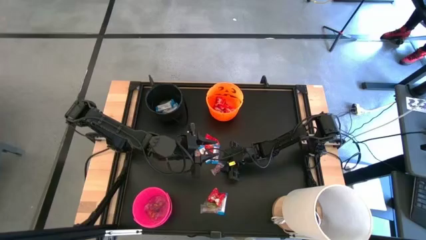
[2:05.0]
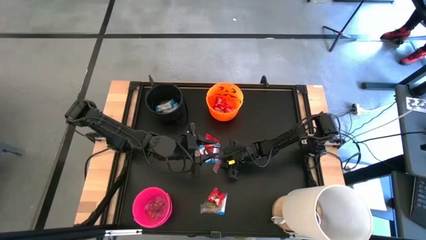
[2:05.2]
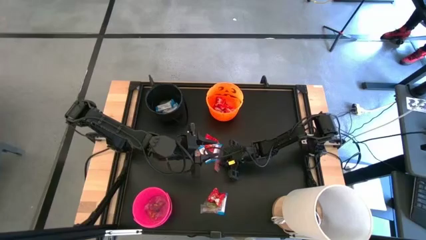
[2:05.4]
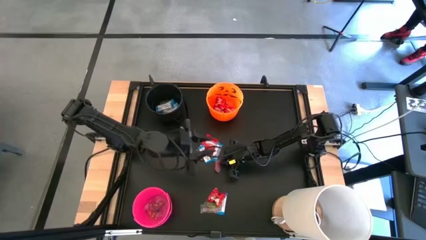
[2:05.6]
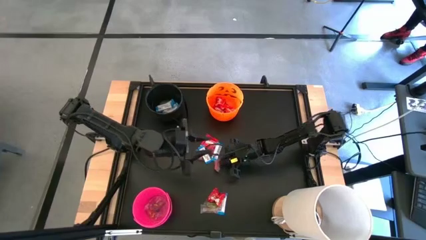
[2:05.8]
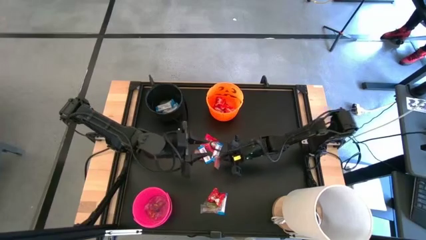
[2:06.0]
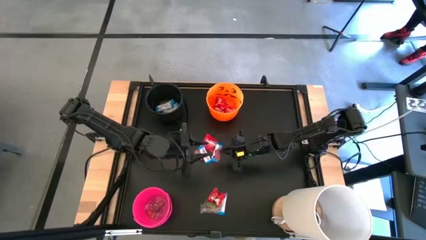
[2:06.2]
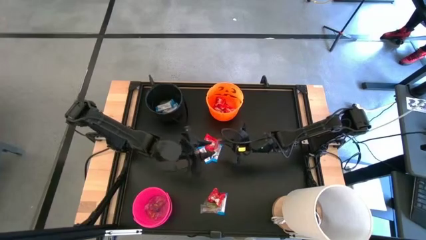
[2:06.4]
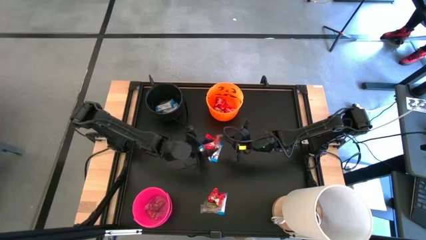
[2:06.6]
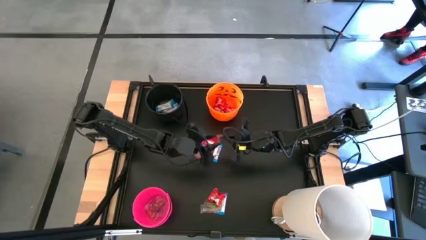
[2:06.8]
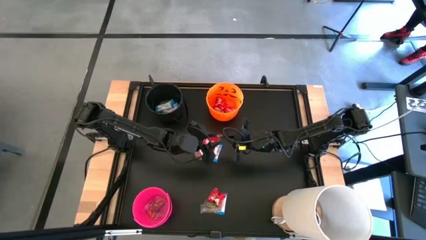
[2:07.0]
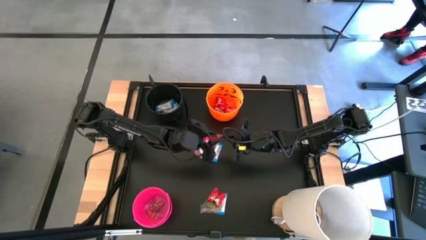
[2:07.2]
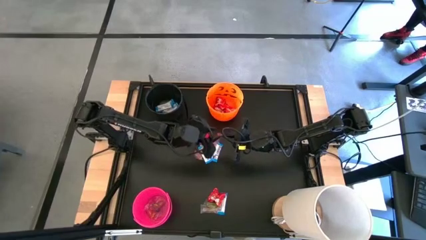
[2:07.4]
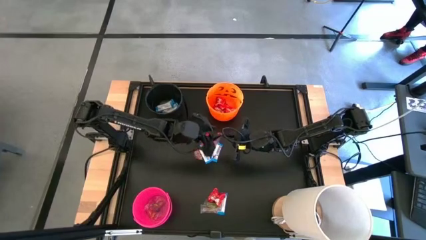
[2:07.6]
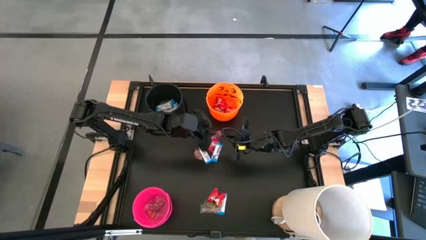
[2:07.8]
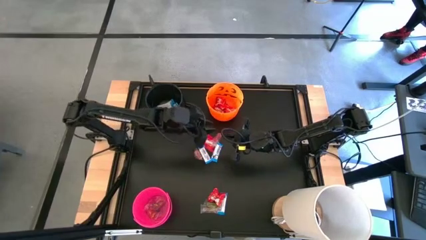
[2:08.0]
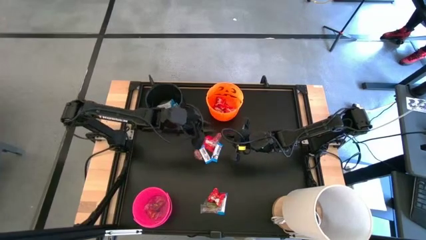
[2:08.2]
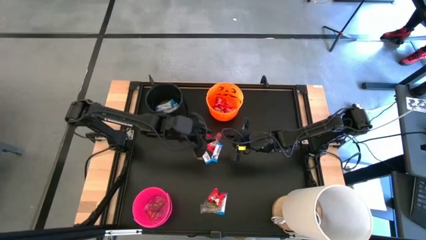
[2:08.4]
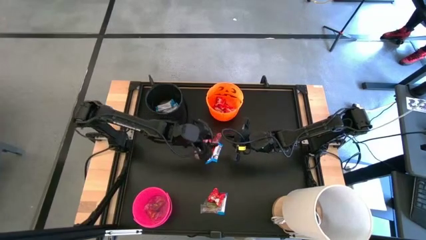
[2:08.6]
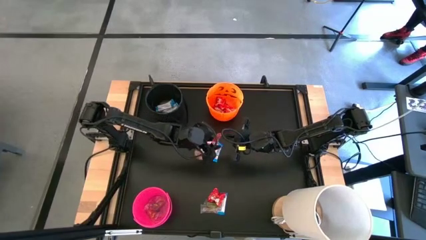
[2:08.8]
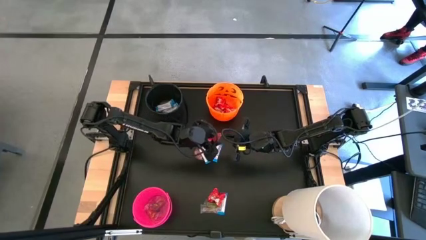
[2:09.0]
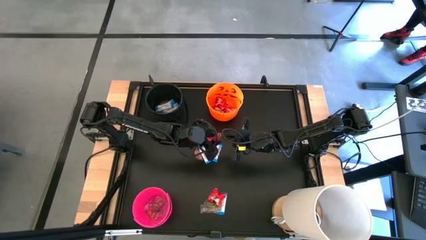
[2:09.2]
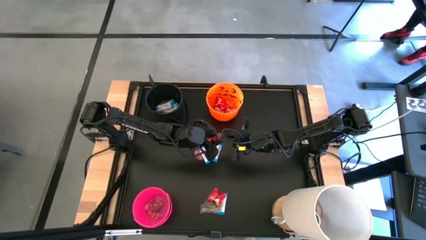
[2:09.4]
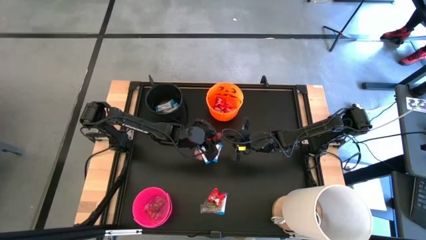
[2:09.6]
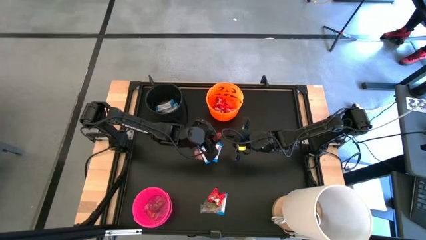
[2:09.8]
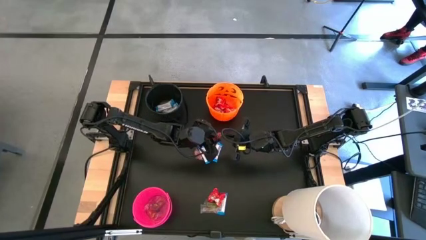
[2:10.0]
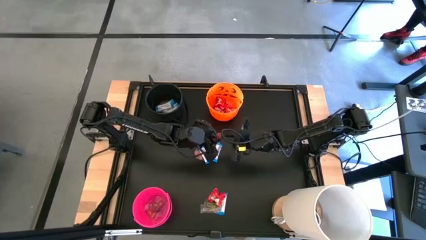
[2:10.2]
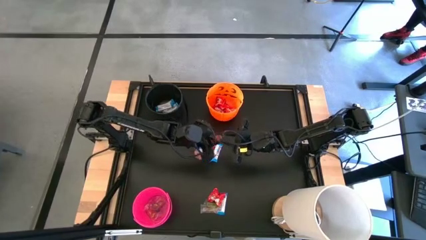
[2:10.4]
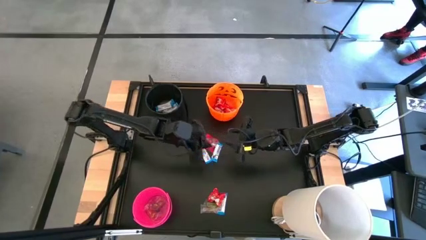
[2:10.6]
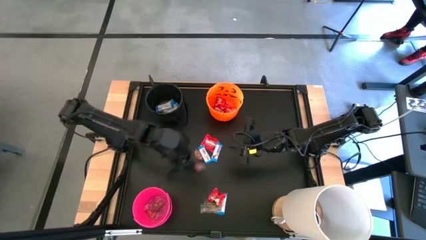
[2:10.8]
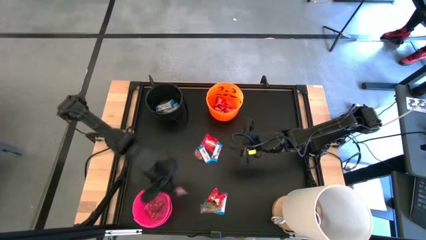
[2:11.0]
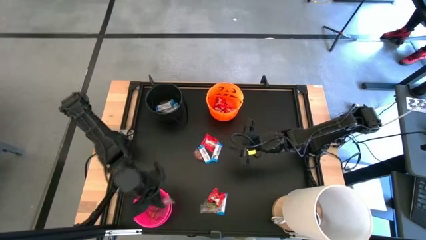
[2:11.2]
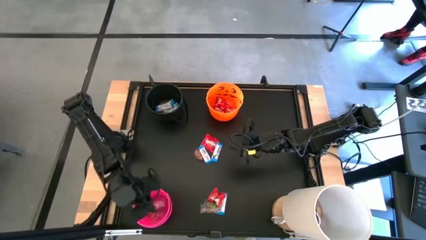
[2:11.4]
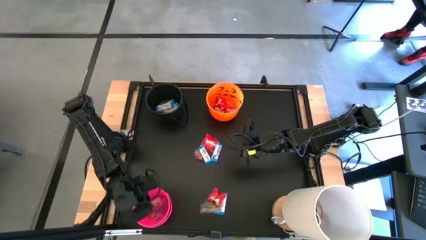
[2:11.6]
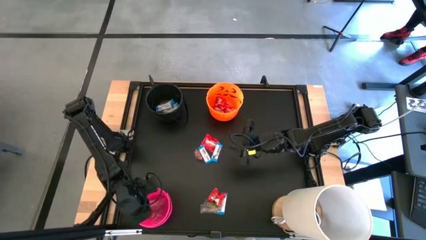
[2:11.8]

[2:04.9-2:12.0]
Task: Sort candy
Put the top white candy into the pink bin

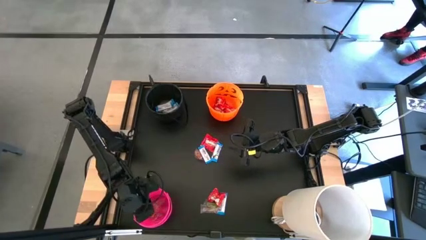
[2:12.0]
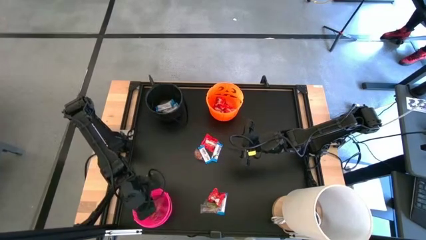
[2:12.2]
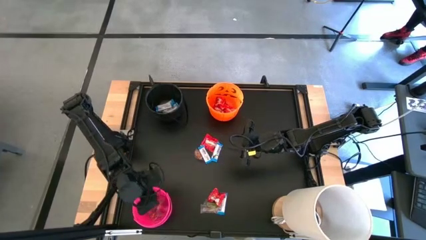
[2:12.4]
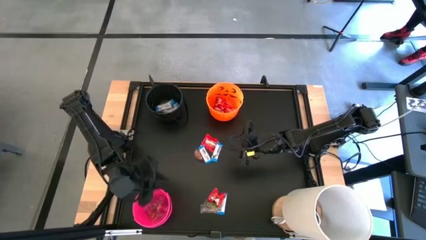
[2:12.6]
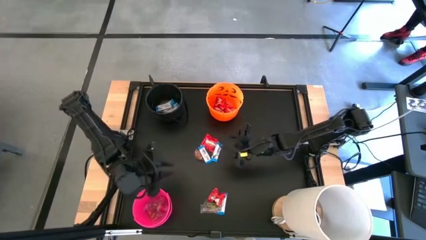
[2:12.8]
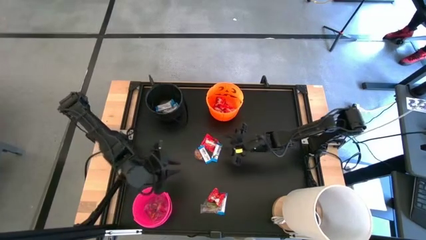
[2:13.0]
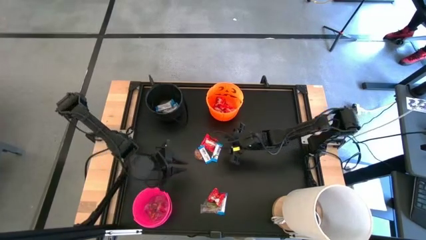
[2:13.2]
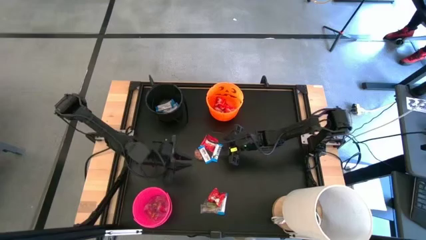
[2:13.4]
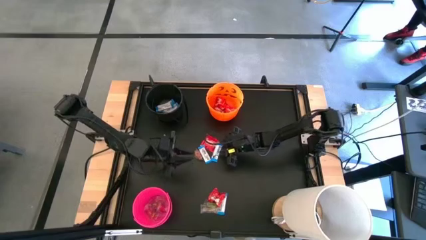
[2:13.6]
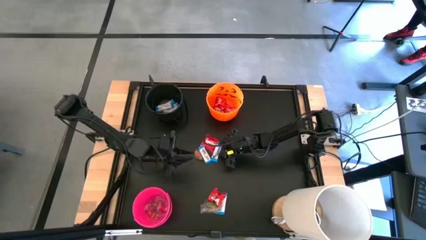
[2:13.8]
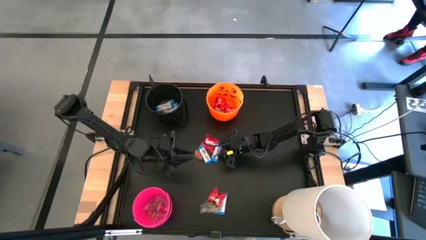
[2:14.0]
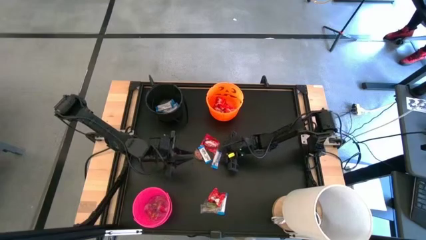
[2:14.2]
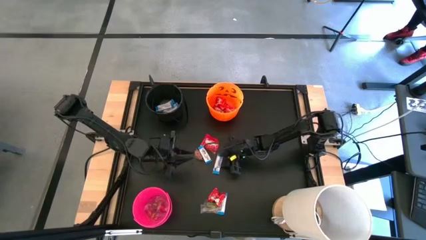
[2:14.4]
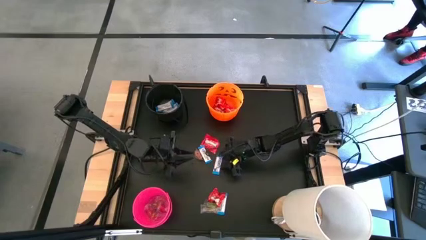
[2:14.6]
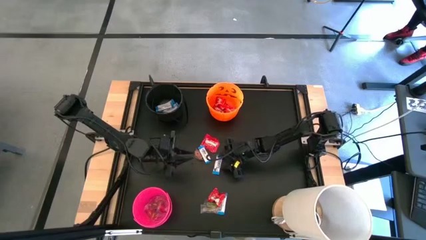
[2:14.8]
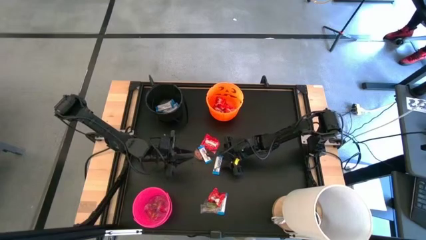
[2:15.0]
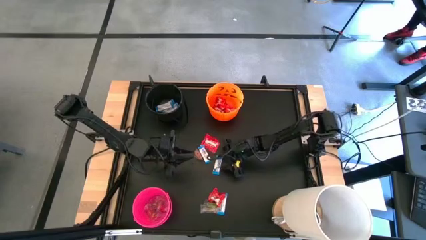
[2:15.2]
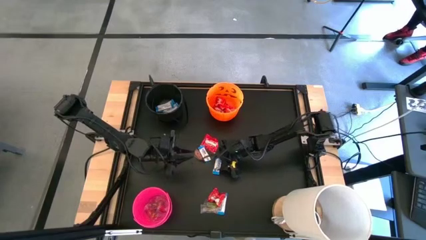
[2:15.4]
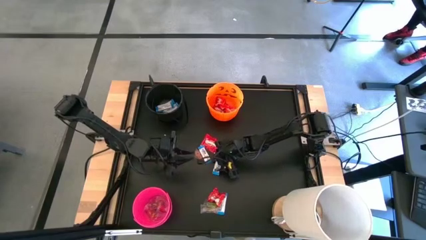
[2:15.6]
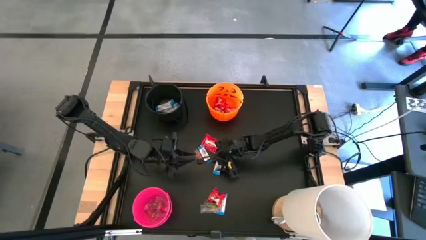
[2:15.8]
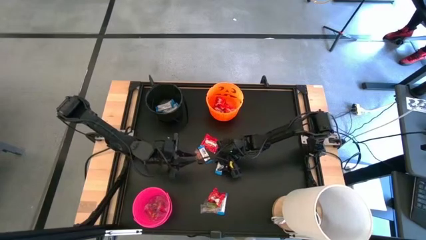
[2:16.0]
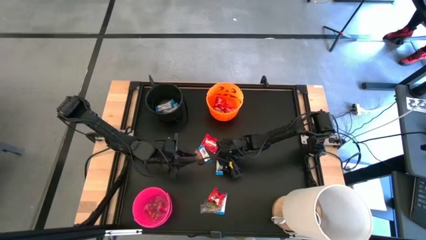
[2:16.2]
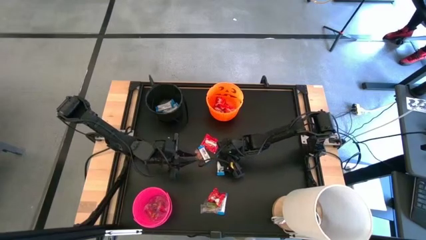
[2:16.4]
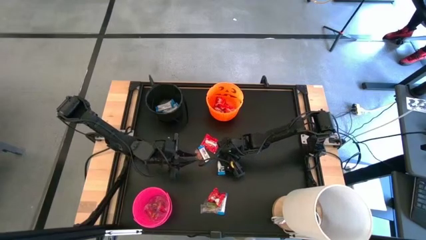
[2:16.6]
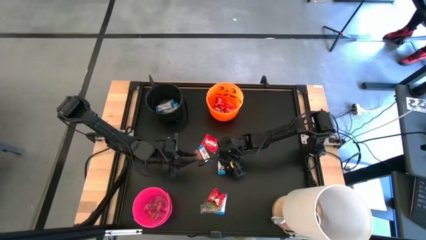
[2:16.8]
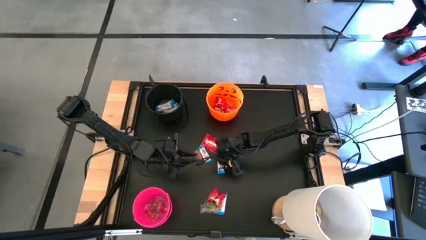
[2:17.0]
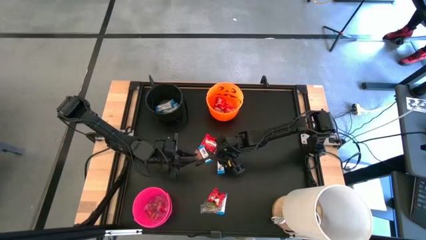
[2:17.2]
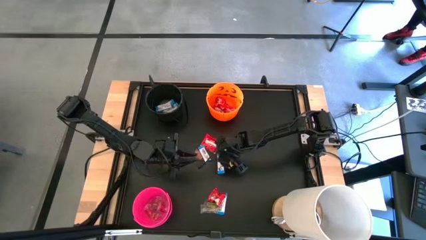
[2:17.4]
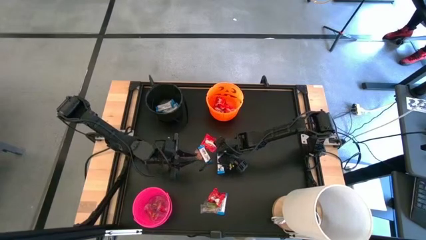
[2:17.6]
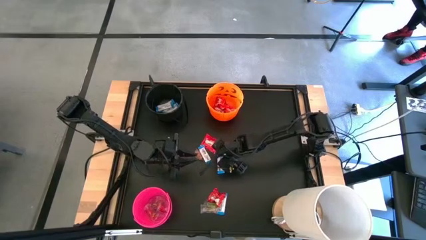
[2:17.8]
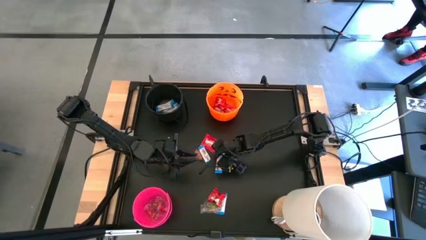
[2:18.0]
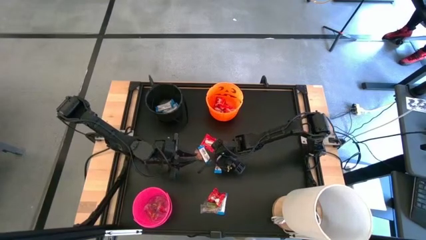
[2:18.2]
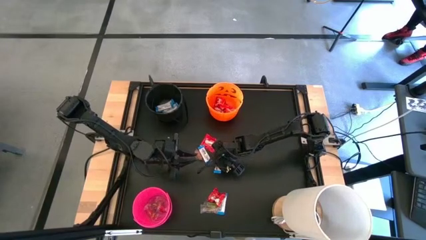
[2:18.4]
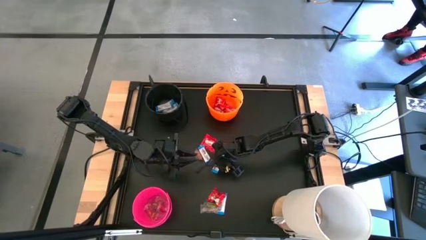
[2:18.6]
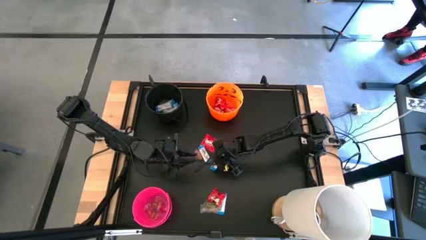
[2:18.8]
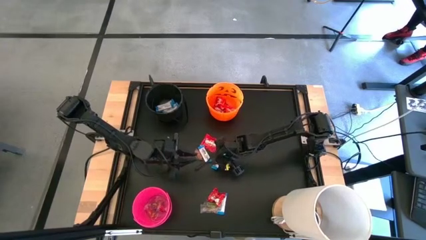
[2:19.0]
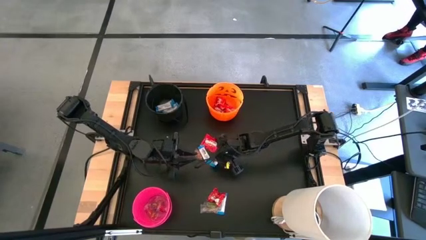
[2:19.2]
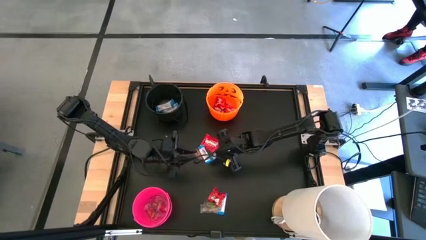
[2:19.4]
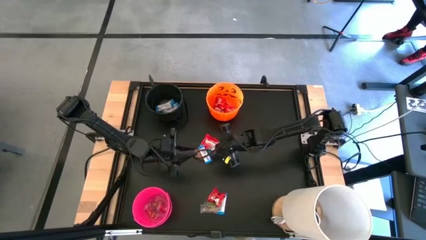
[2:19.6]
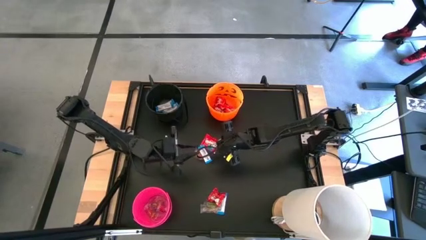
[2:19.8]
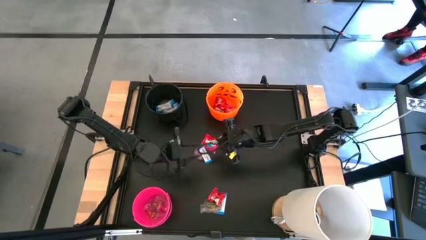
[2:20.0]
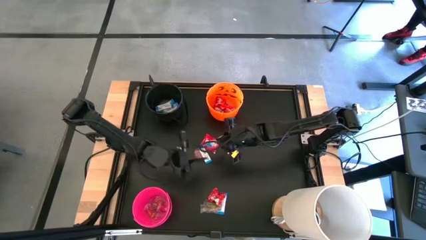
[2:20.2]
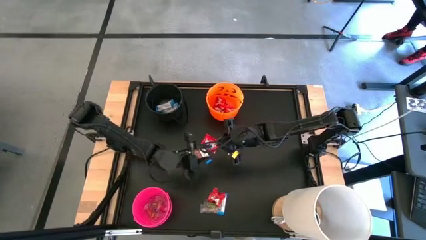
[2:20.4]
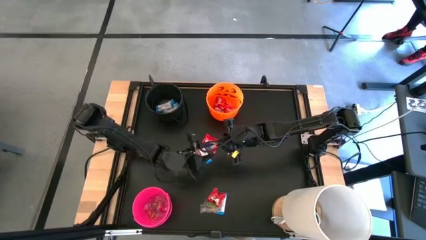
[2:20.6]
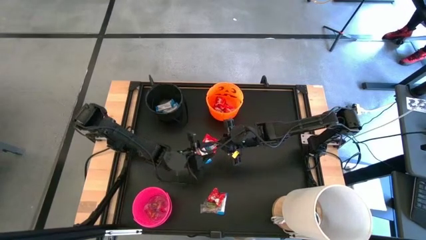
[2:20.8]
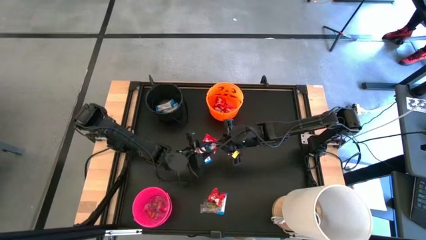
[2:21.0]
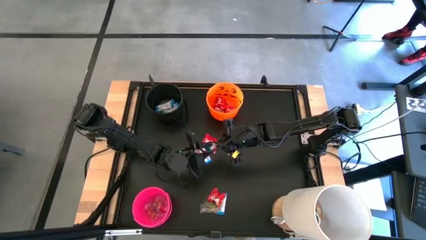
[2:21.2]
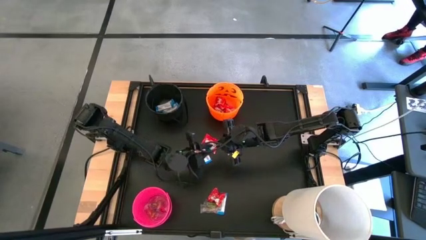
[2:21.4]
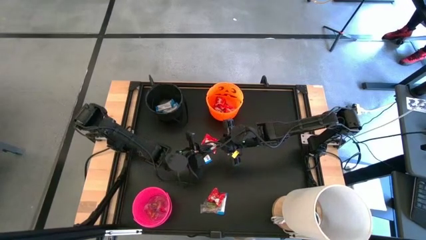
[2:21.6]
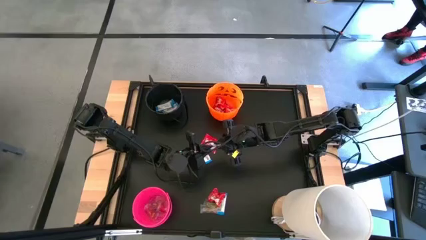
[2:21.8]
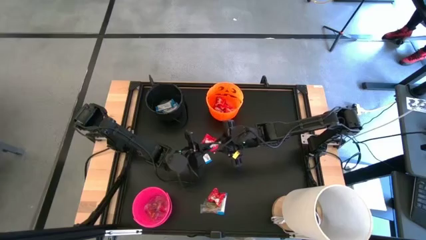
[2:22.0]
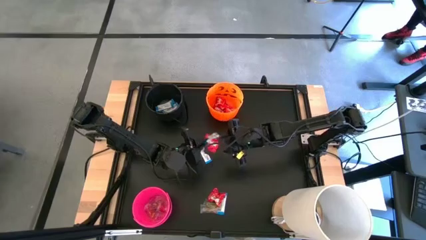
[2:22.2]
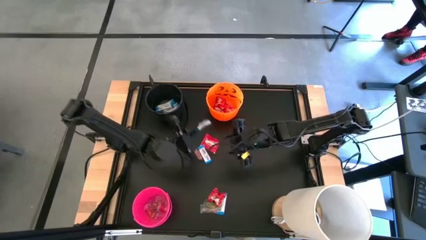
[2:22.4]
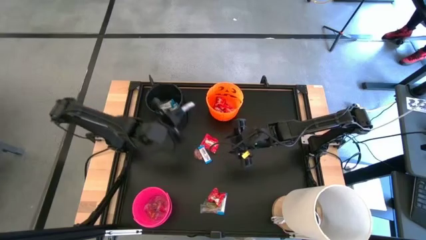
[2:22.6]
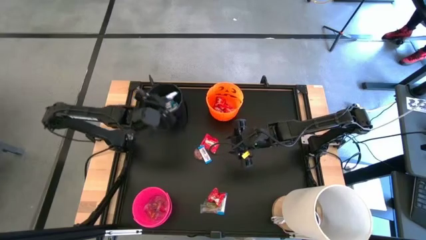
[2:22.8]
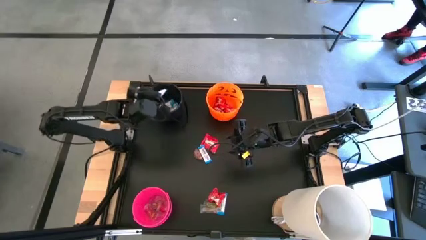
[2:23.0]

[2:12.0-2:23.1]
Put the top white candy into the black bin
